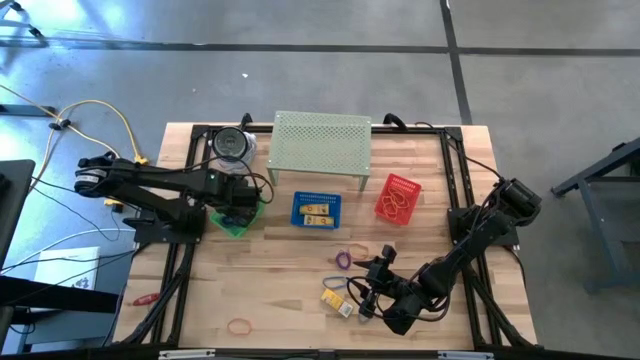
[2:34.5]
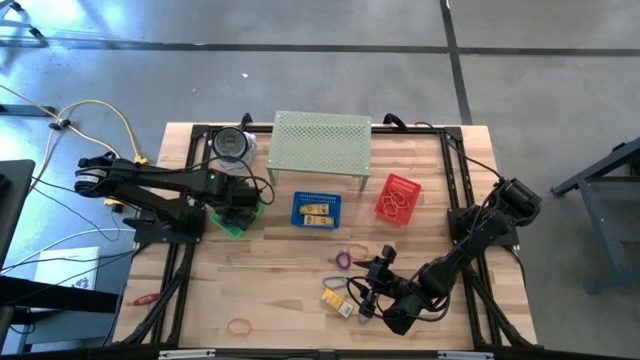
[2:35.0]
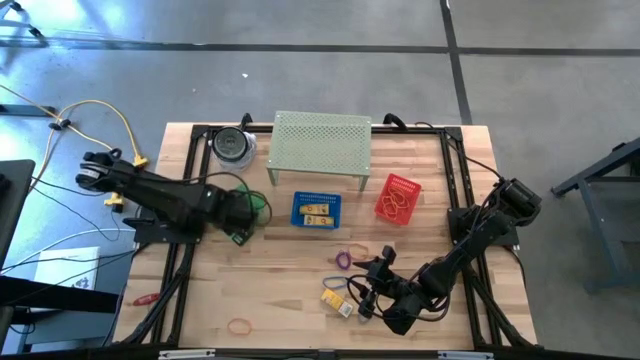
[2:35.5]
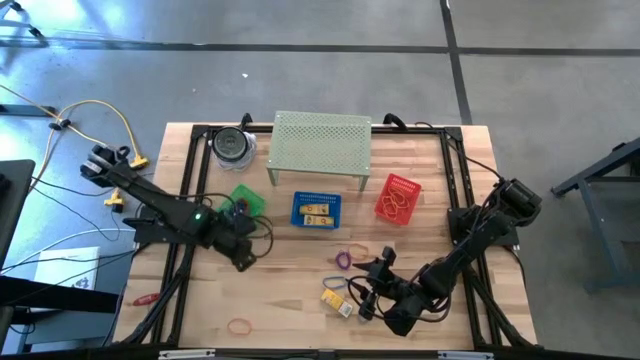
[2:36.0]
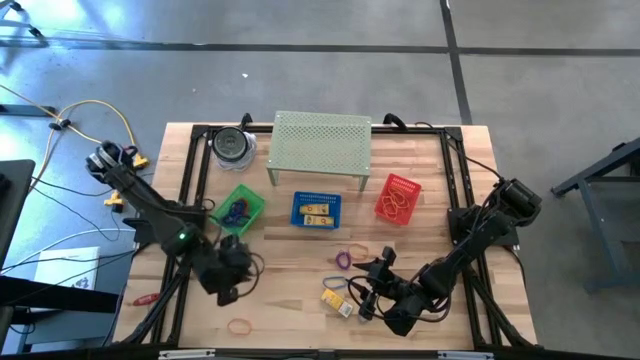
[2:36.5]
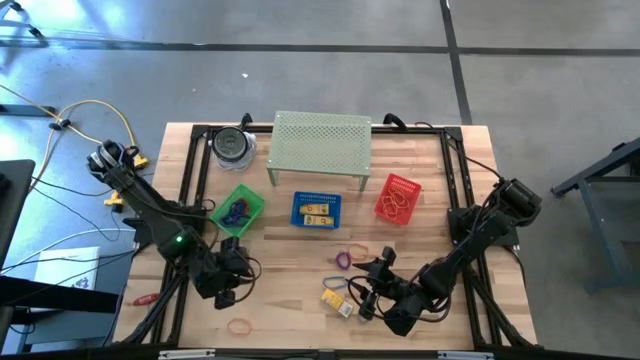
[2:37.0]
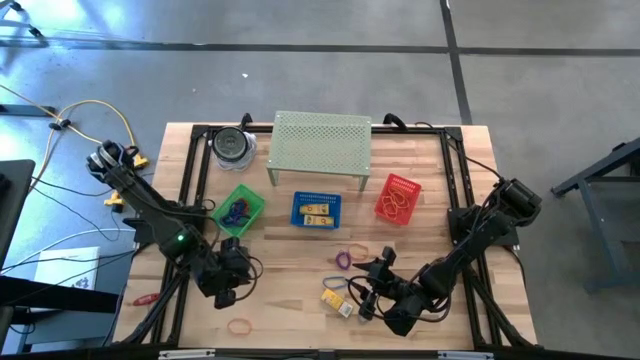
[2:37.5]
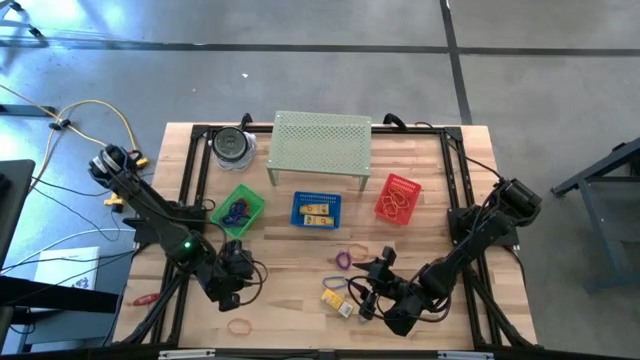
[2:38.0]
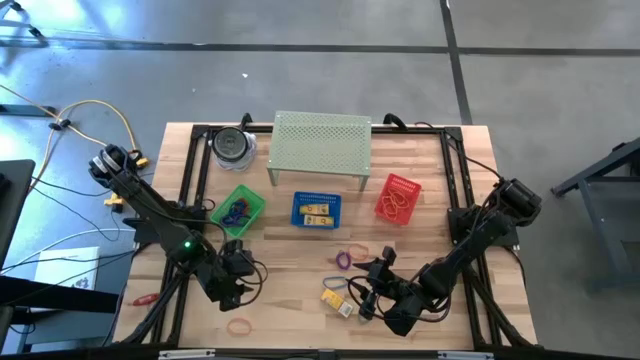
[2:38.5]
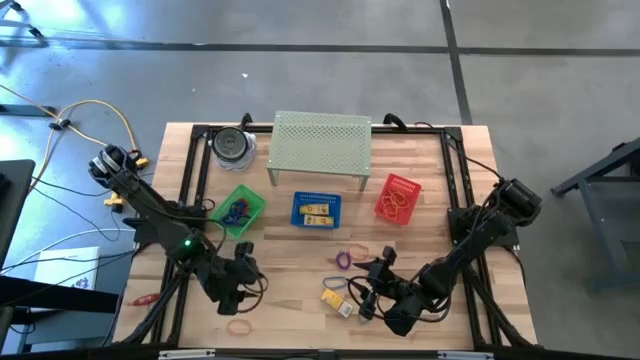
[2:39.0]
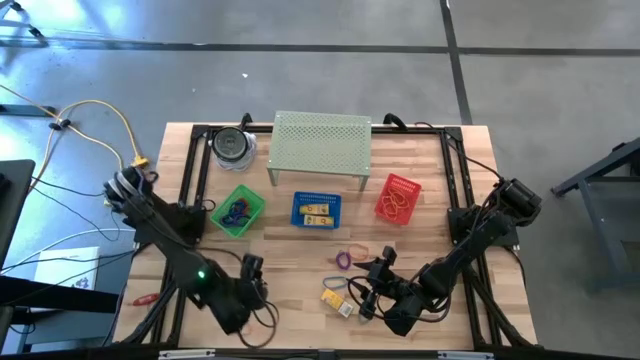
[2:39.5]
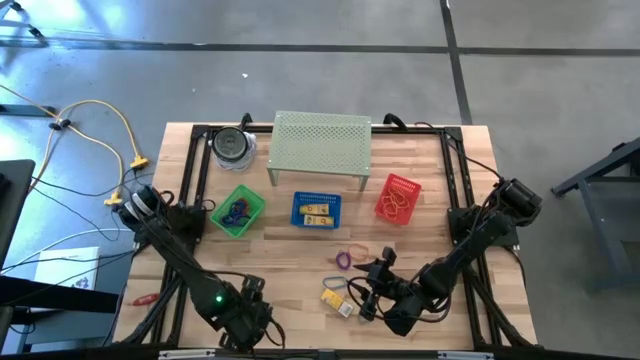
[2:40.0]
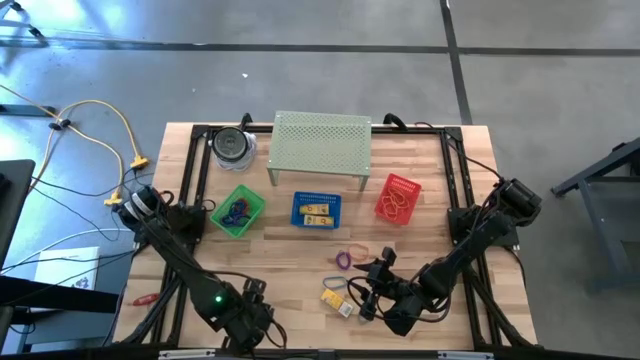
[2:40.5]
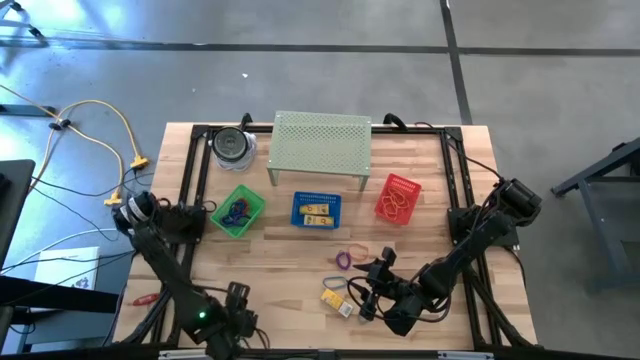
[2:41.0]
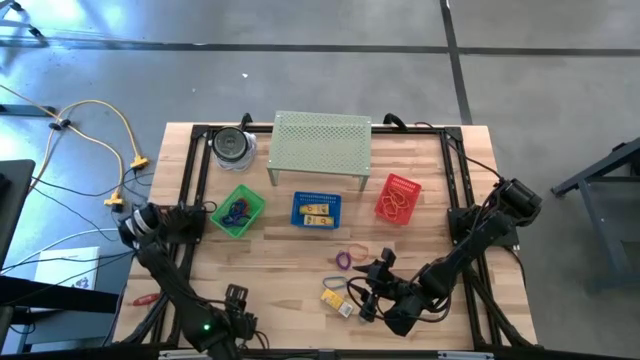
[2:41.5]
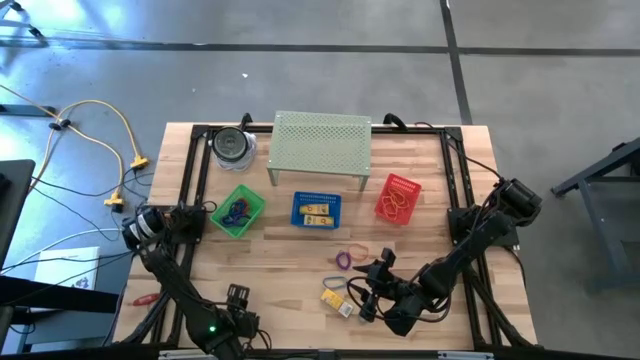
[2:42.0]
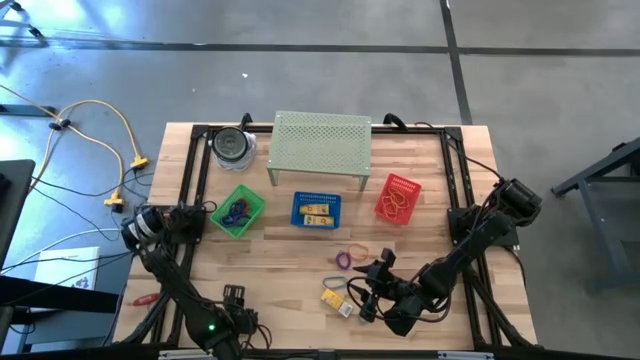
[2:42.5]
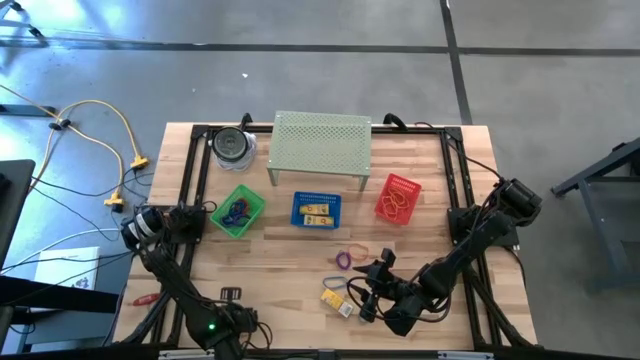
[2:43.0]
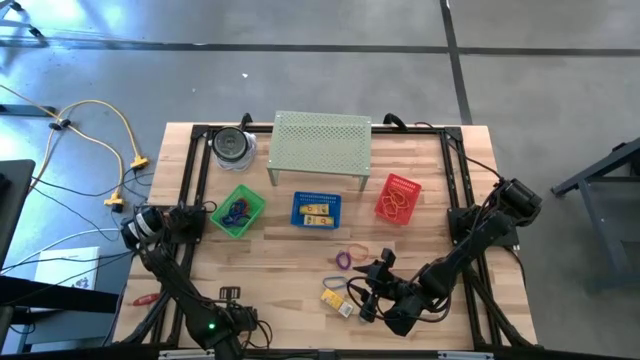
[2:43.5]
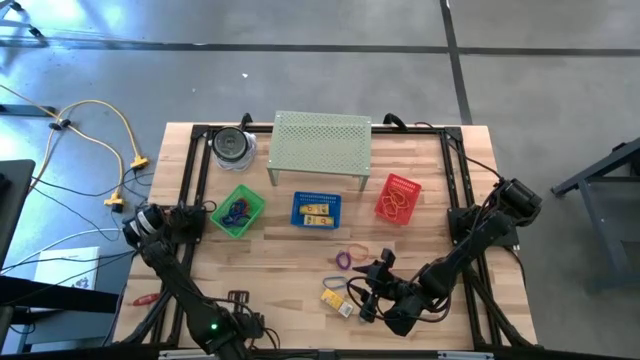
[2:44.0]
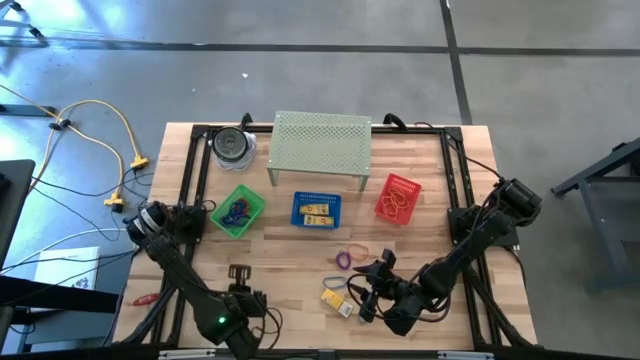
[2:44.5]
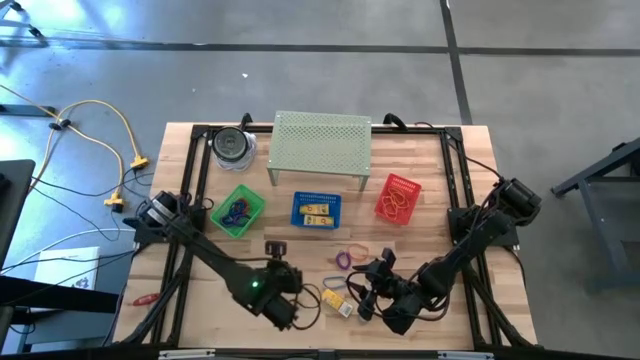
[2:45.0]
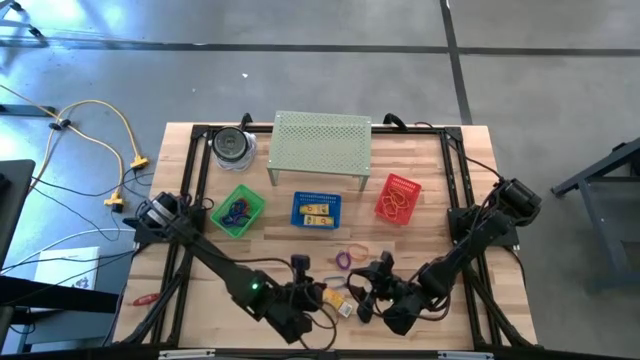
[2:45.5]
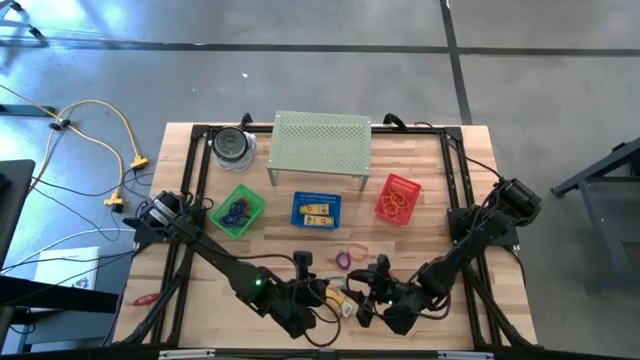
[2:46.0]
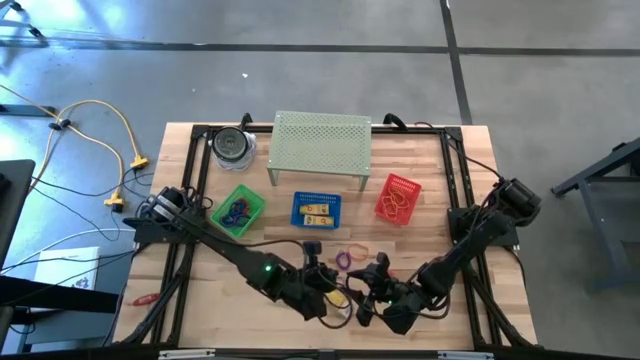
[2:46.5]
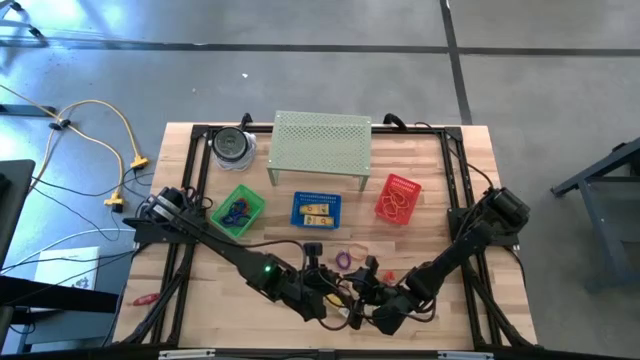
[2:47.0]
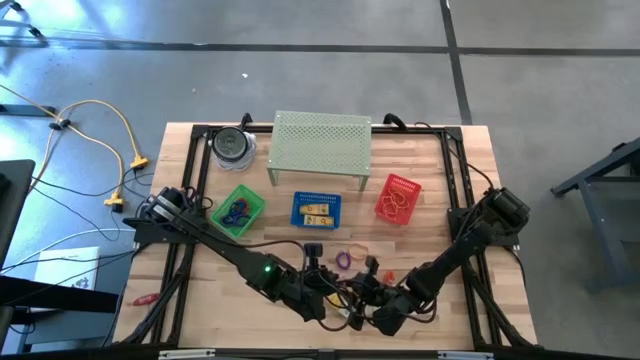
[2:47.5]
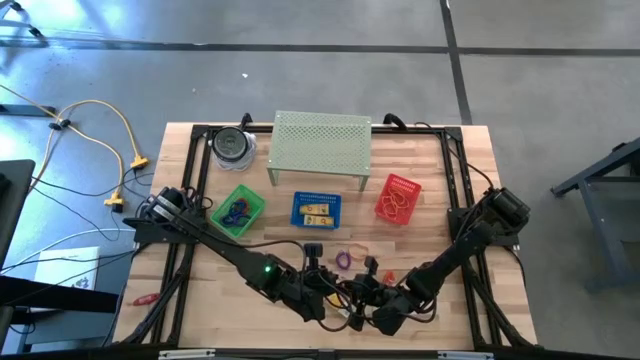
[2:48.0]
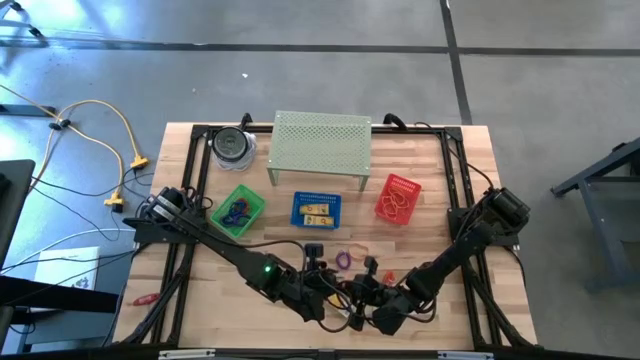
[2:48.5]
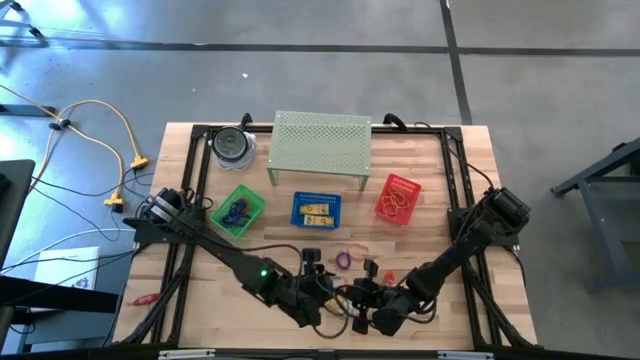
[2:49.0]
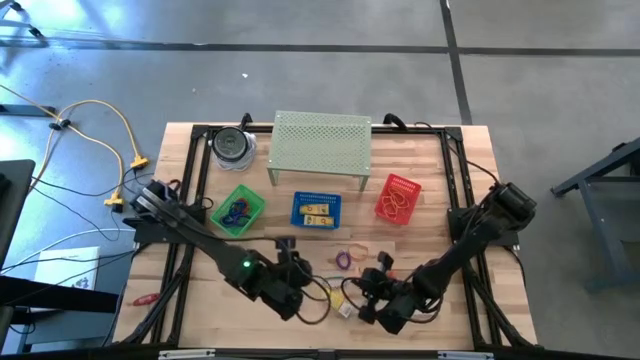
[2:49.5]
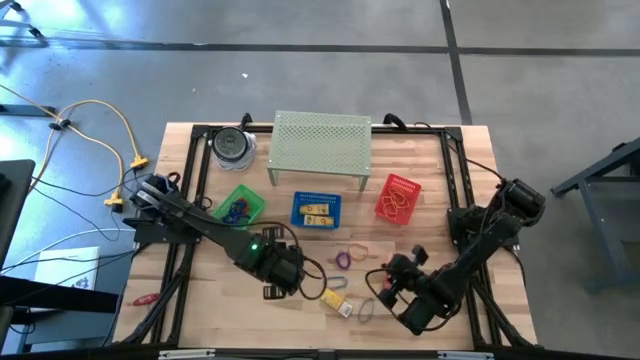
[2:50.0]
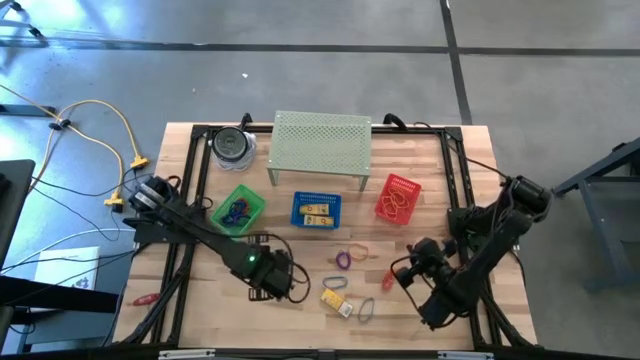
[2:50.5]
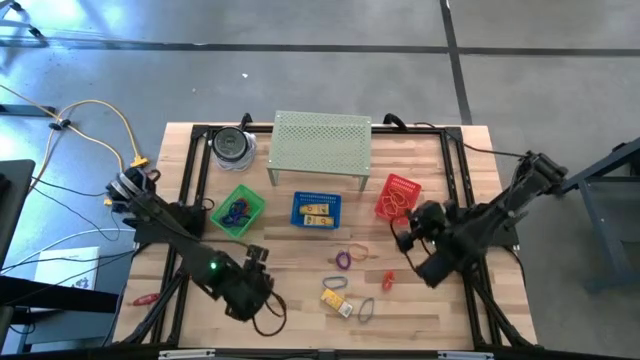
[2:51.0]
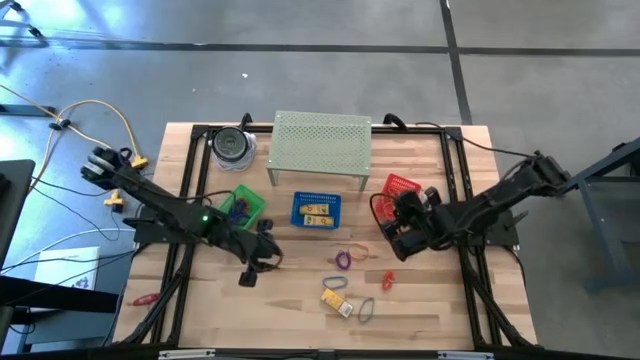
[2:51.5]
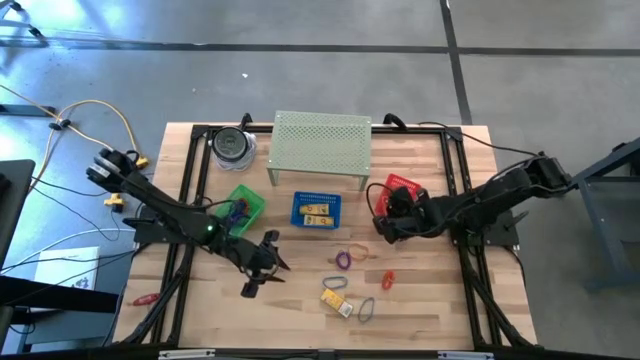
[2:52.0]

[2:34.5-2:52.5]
Task: Pick & Place Office Desk Supplies
Put the orange rubber band into the red bin

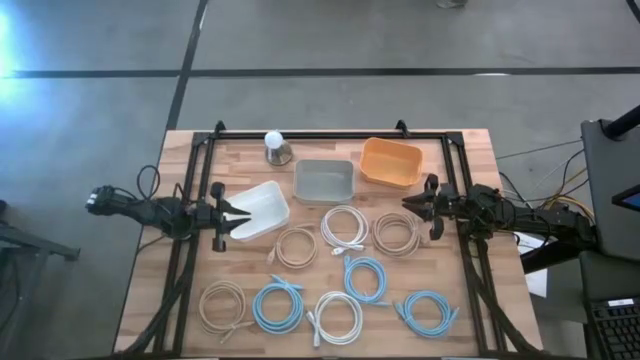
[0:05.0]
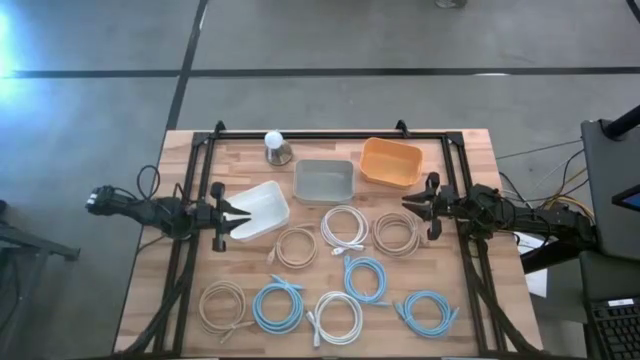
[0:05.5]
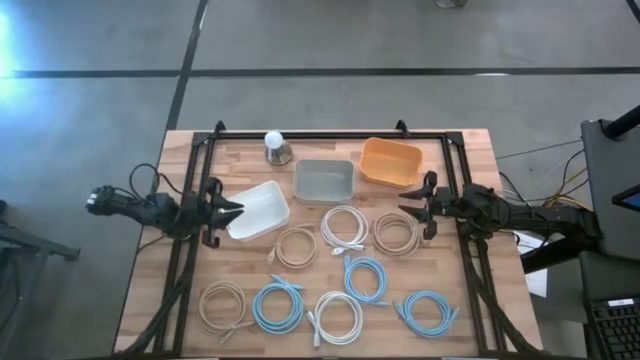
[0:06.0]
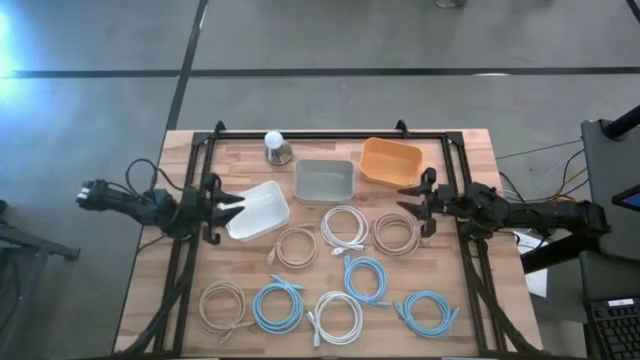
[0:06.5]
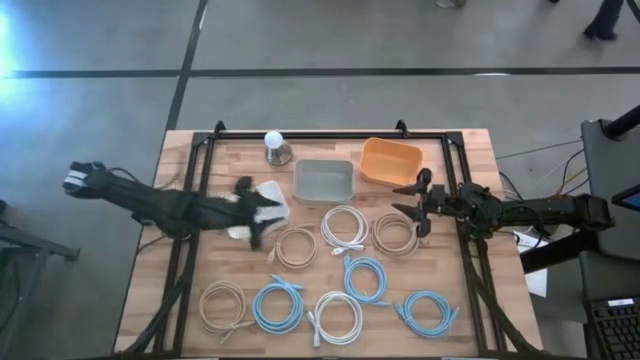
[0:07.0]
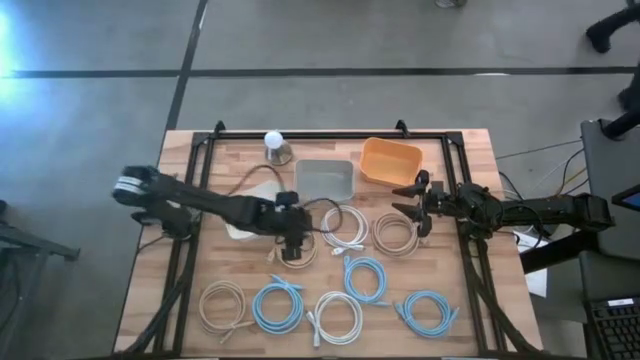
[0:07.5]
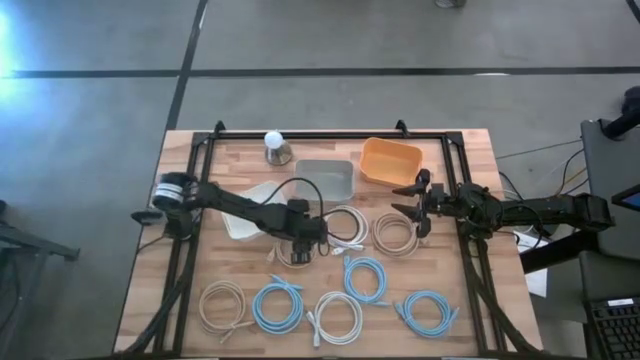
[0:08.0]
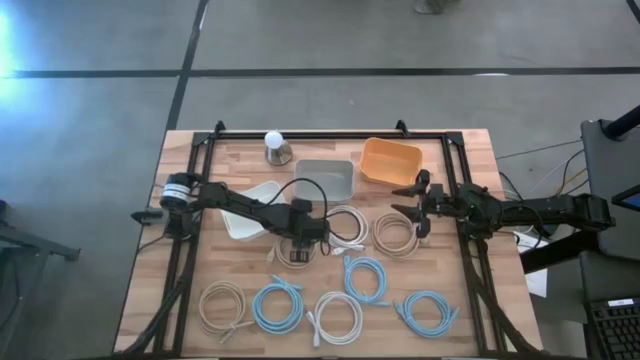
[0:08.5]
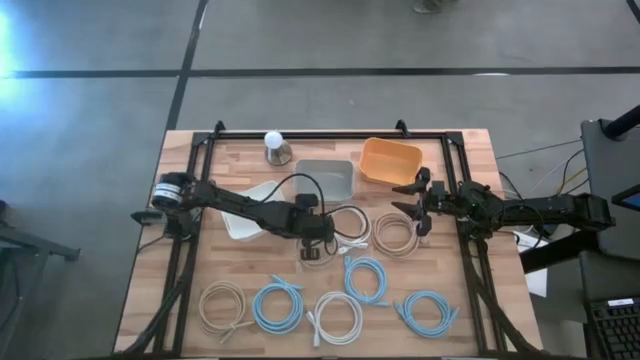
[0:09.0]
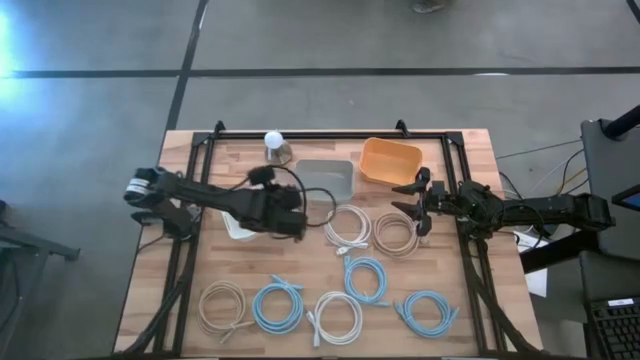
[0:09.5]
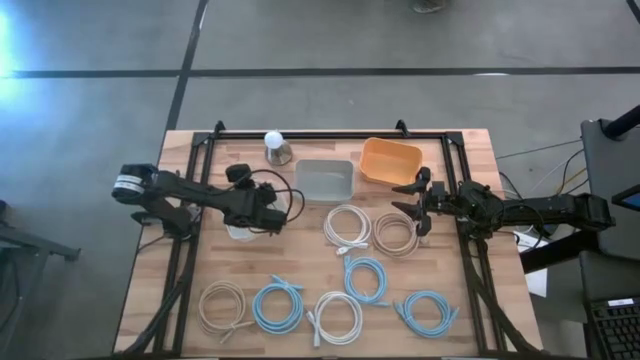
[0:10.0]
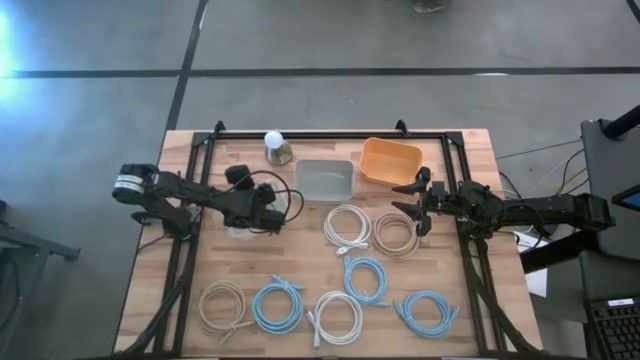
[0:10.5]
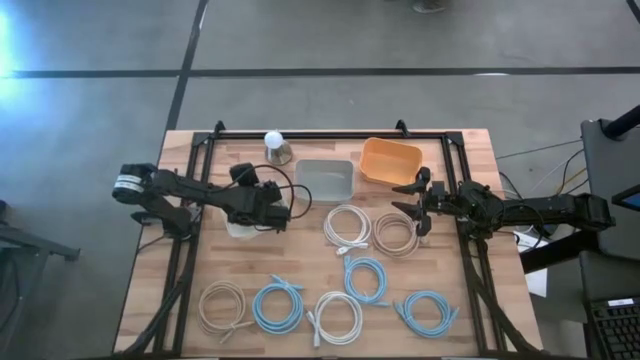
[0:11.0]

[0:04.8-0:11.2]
Task: Sort HDMI cables
Put the top left brown HDMI cable into the white bin
